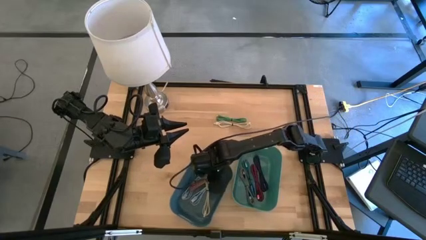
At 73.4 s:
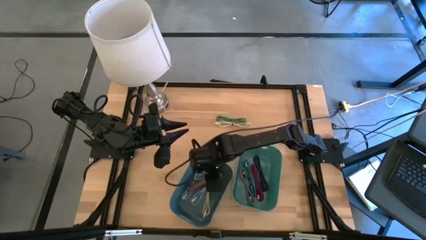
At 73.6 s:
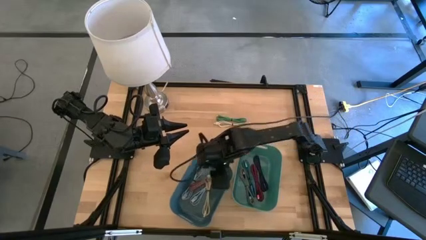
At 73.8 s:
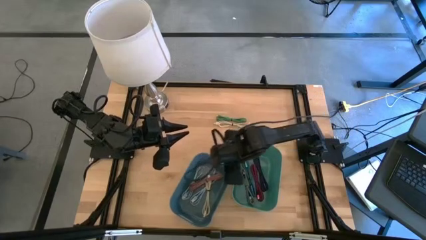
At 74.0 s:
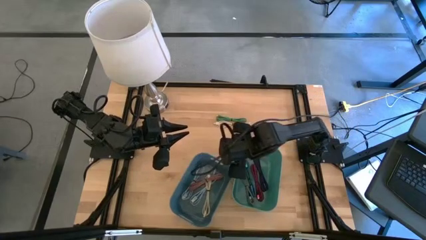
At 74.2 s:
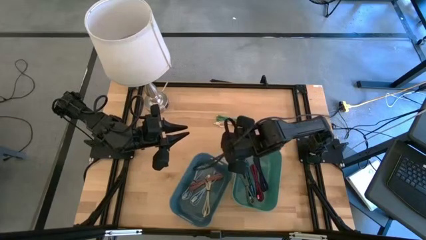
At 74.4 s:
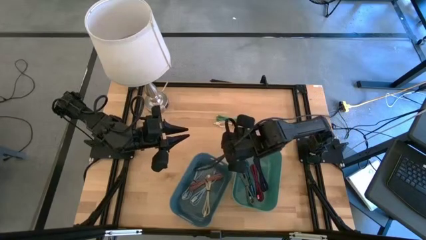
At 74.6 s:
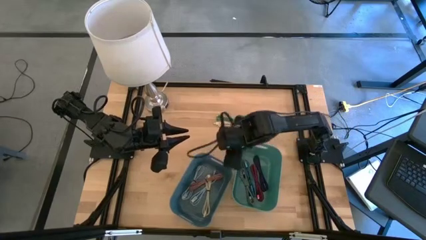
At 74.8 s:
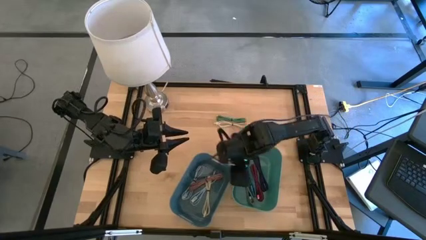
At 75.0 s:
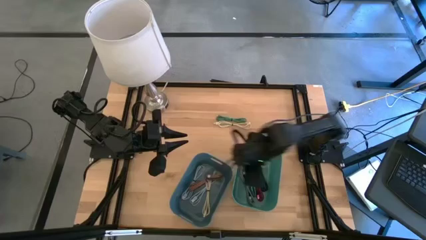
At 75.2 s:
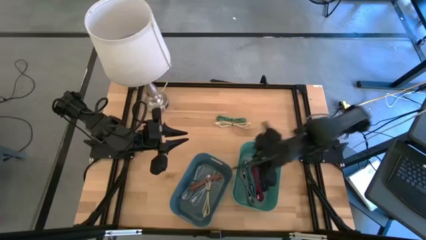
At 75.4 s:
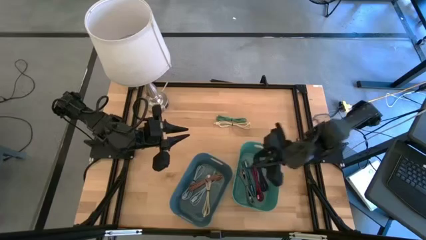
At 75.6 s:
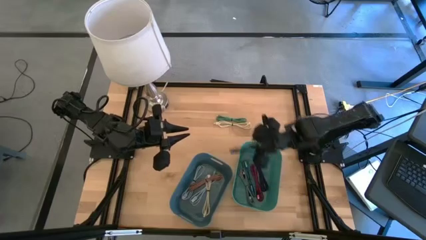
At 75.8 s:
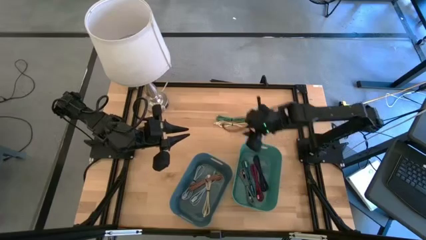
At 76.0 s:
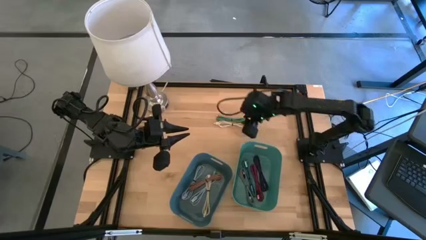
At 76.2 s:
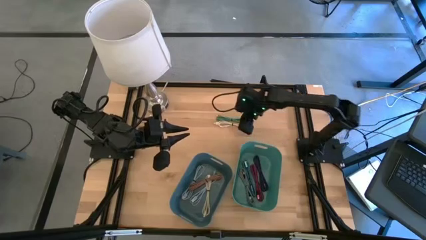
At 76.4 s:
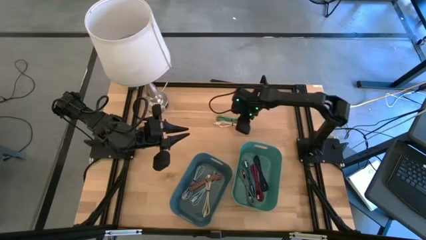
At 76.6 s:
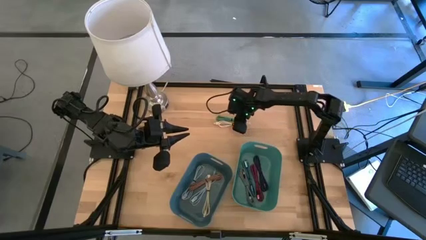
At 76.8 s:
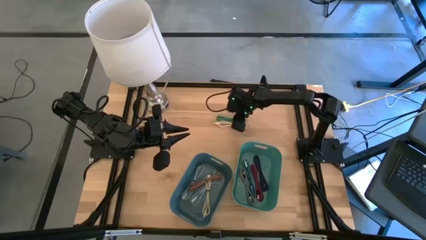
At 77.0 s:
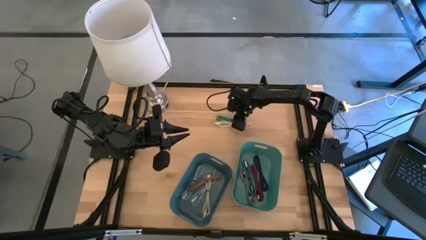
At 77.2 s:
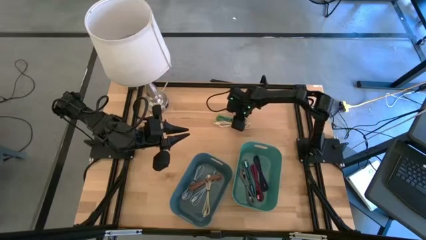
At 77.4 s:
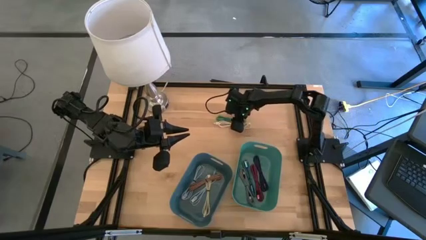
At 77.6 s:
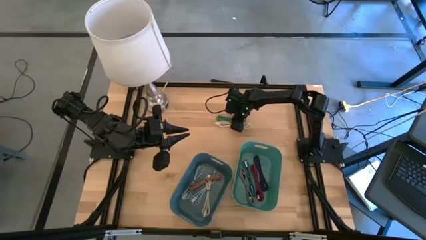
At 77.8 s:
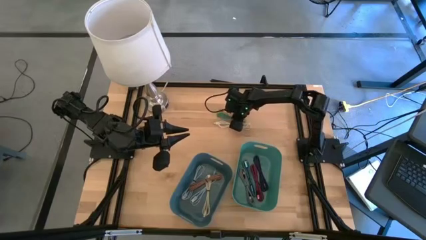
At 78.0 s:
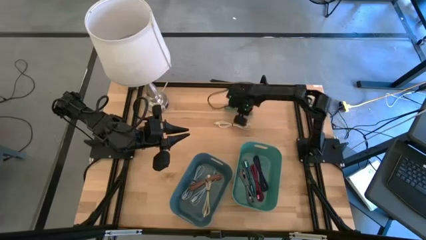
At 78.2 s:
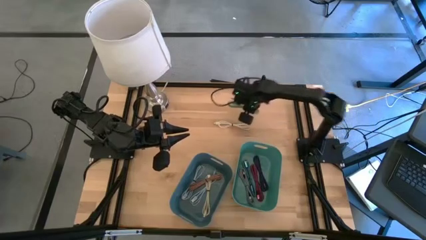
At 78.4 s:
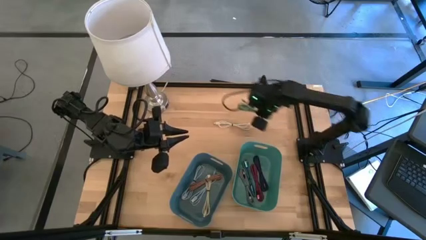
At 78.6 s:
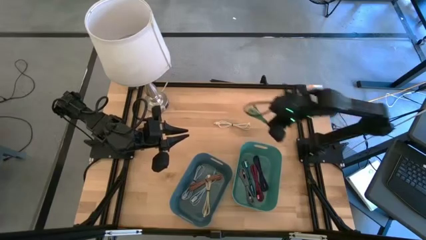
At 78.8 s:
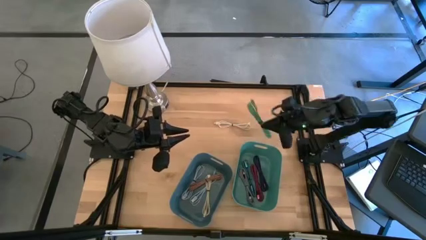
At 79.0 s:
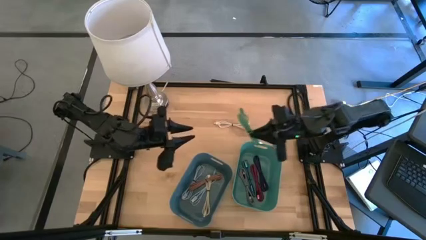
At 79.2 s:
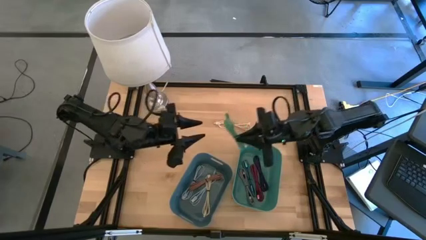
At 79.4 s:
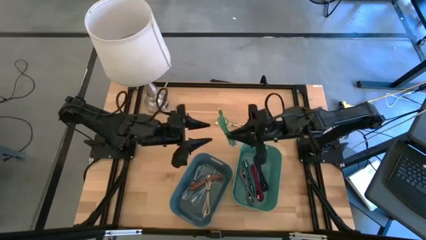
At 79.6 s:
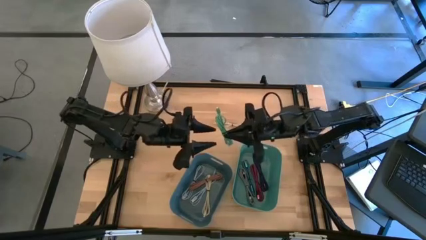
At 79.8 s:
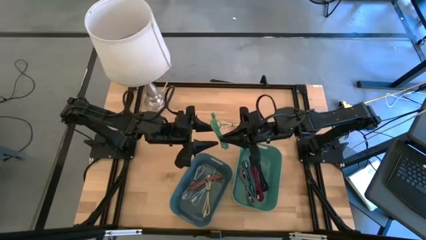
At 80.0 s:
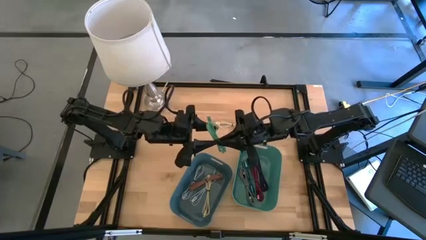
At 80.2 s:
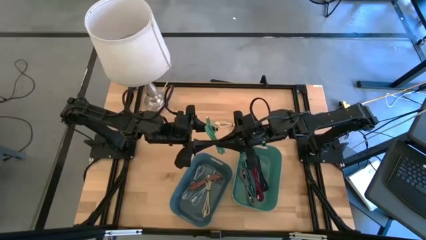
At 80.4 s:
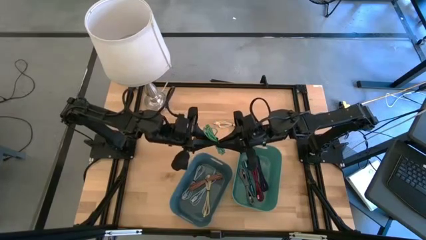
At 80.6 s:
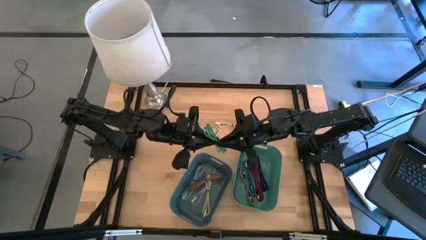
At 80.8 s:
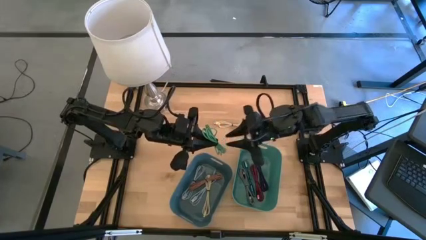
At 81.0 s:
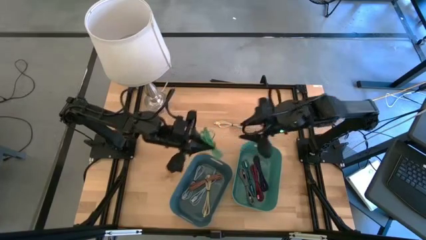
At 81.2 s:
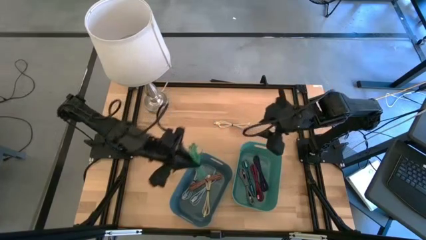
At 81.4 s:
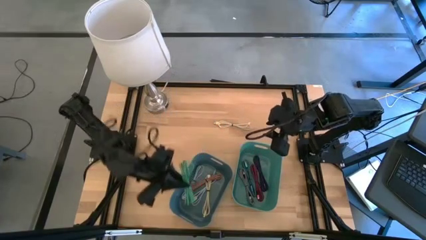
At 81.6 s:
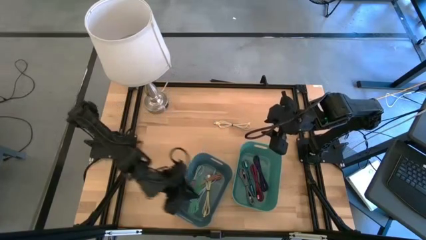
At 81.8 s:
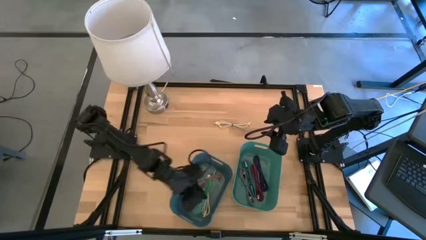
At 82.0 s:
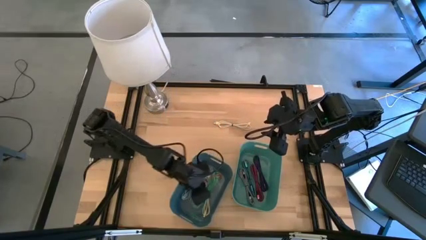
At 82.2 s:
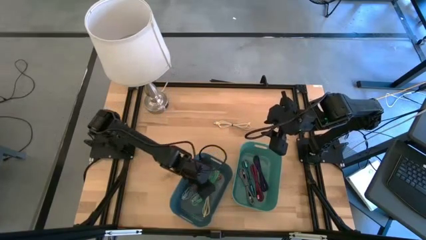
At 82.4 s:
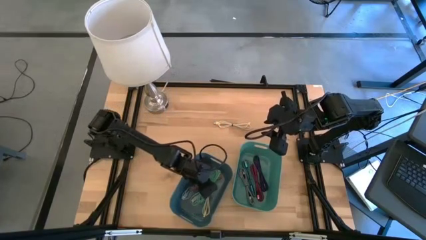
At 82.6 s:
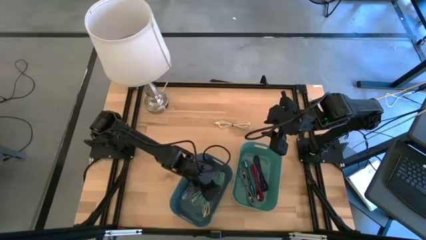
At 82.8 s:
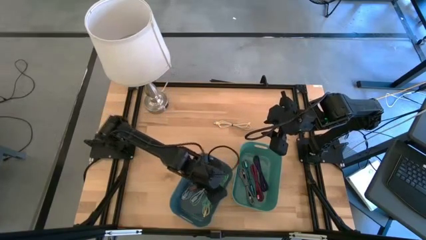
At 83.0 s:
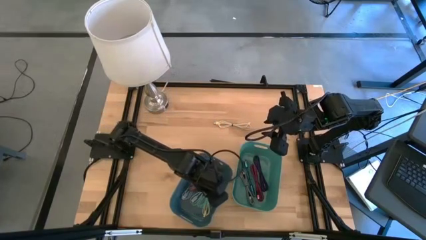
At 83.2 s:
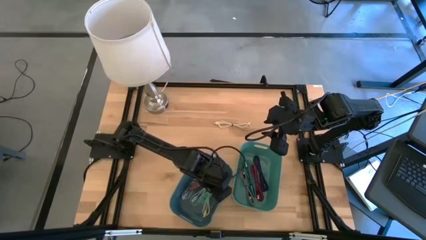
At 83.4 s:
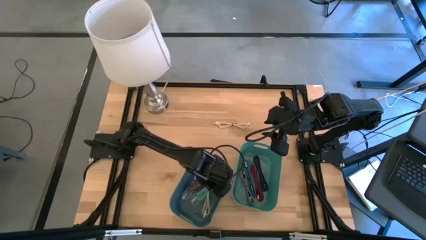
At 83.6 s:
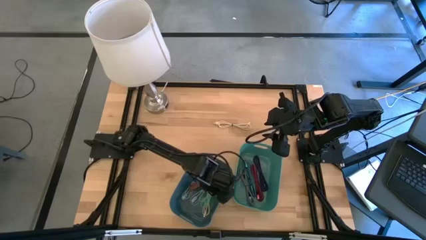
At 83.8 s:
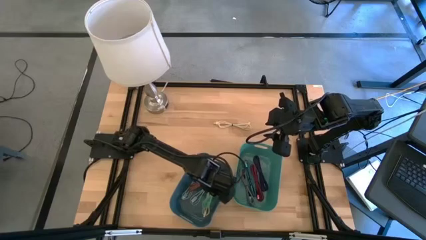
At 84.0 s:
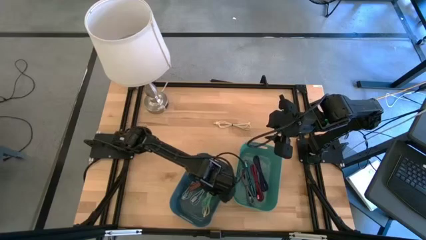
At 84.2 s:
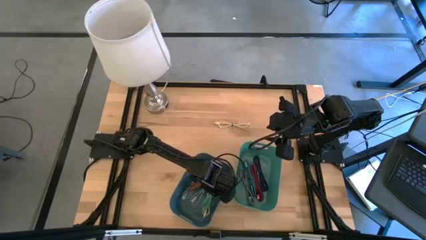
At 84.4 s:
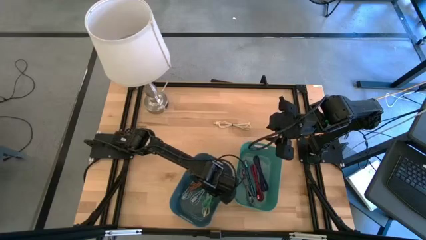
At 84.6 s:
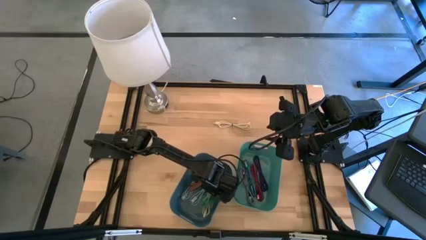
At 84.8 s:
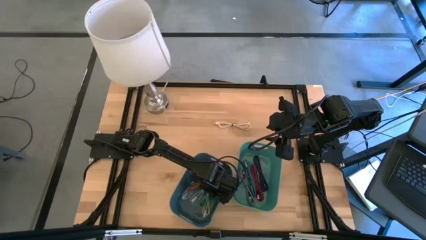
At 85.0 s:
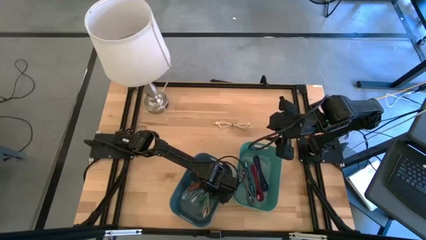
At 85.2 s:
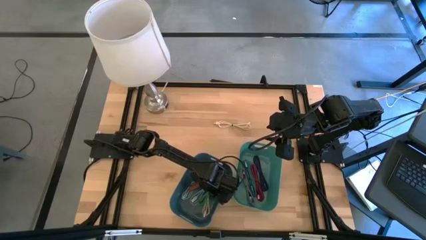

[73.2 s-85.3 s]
Put the green charger cable into the blue container

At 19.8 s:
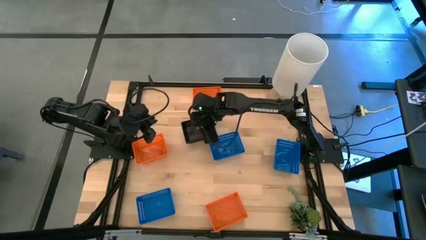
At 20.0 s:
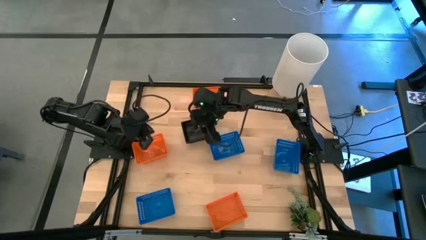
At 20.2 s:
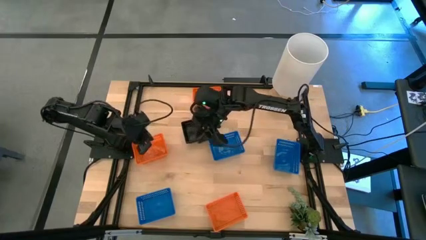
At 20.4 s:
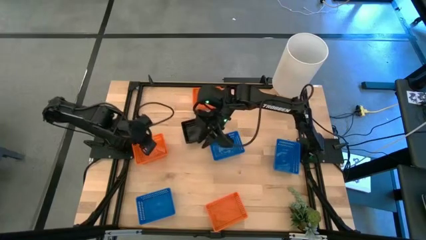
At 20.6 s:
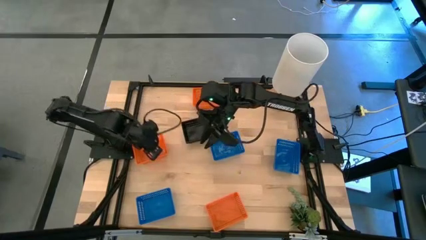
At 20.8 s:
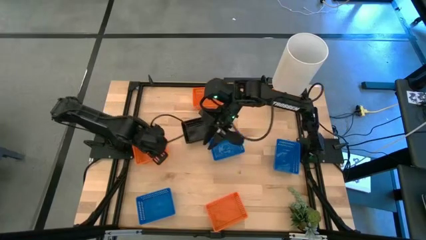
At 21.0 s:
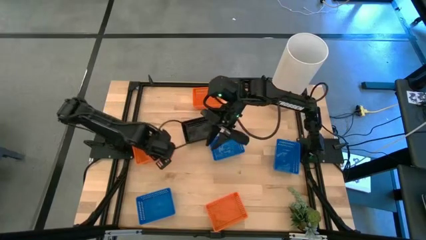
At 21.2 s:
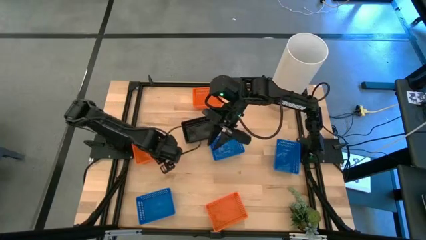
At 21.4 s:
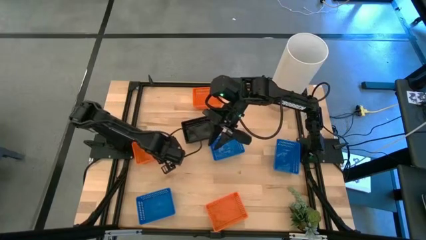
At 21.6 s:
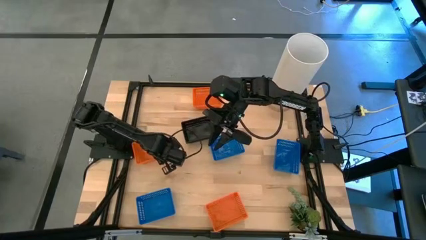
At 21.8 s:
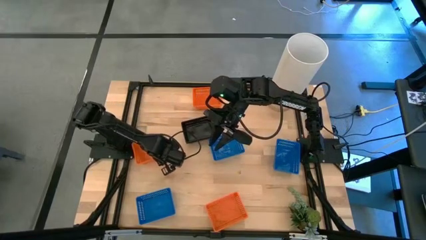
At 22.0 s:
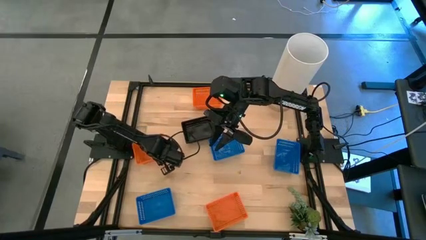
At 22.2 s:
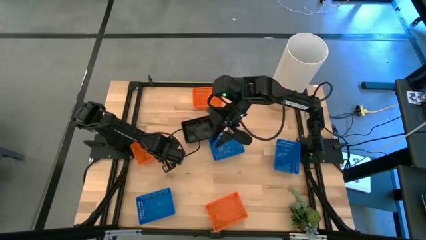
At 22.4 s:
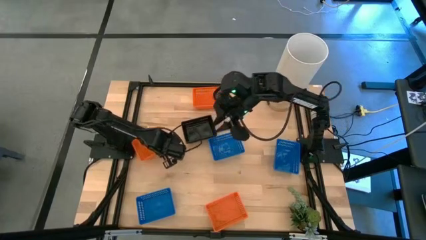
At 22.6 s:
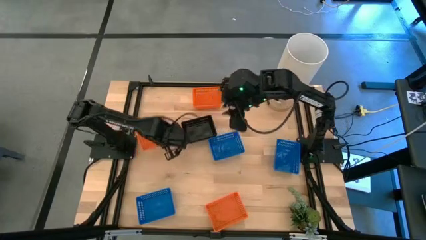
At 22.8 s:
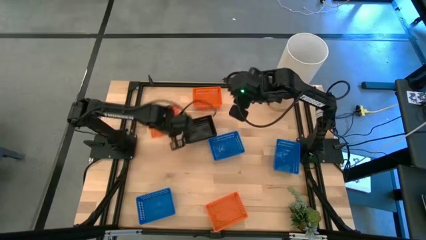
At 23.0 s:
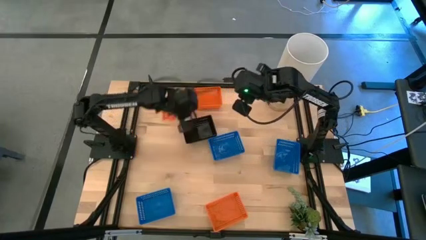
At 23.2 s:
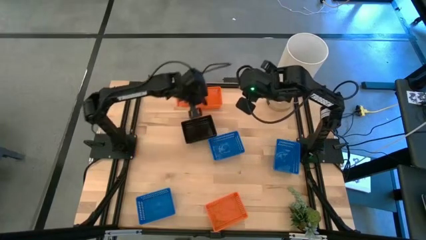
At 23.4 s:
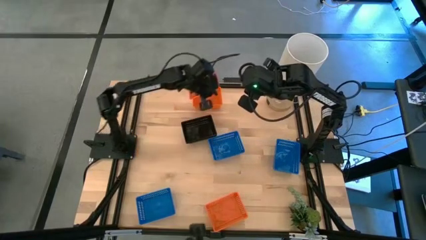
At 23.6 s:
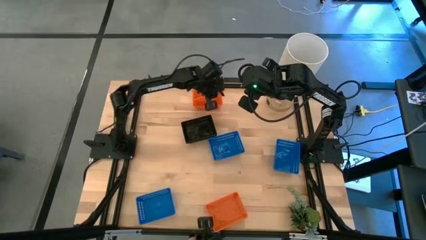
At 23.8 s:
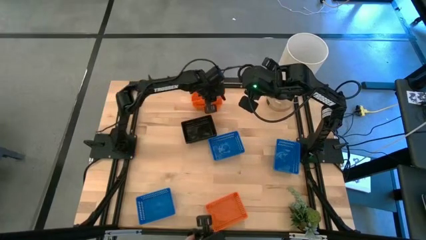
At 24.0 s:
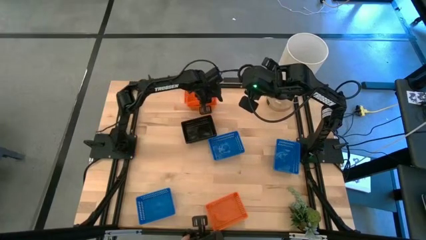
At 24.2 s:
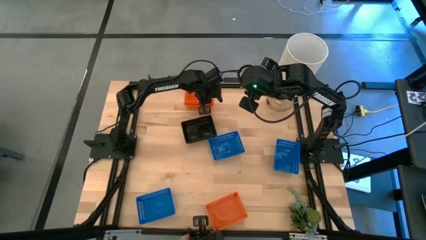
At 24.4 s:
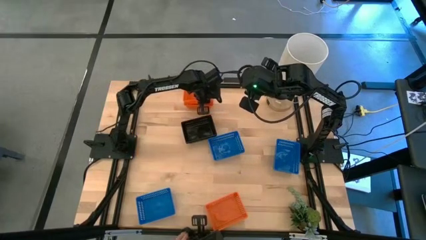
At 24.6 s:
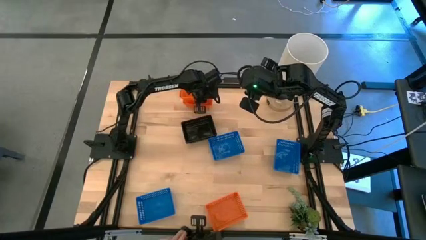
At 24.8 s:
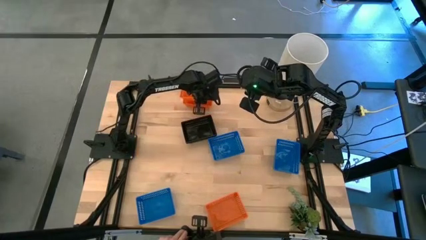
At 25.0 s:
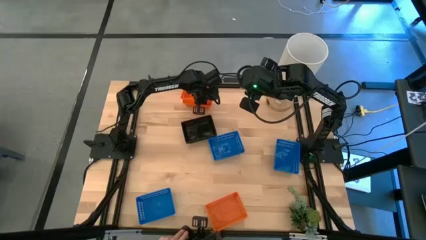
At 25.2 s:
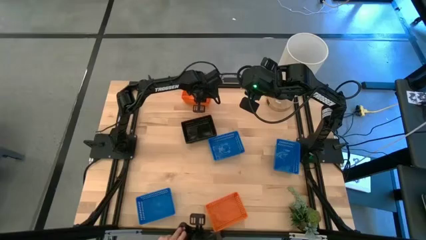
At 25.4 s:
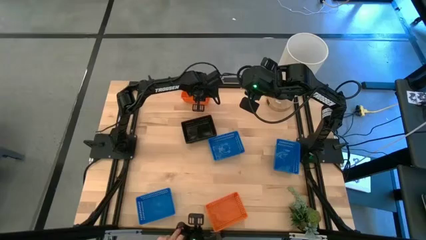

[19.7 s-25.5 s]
Stack the middle orange bin on top of the top orange bin
